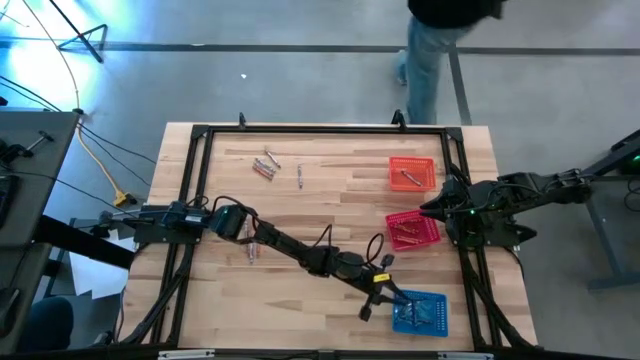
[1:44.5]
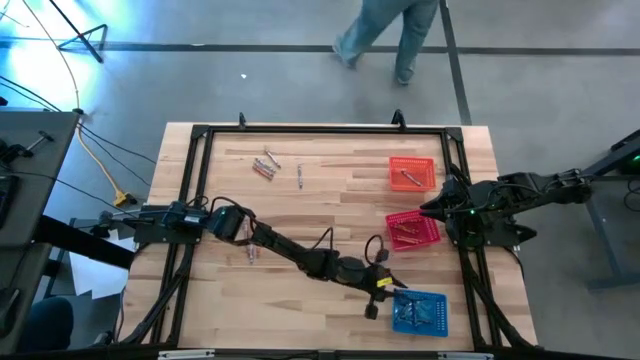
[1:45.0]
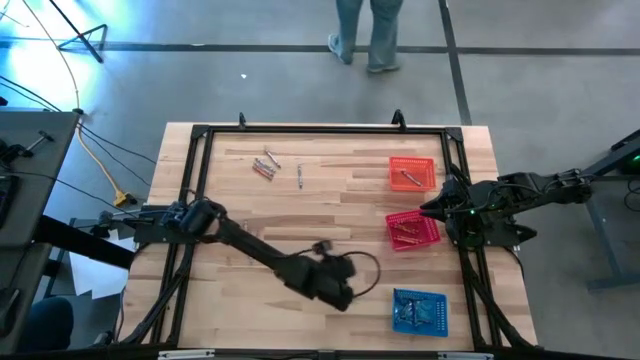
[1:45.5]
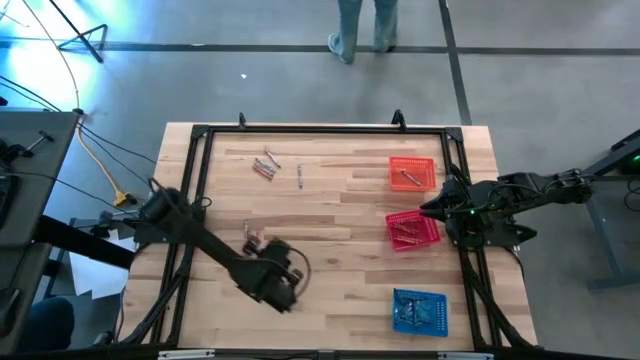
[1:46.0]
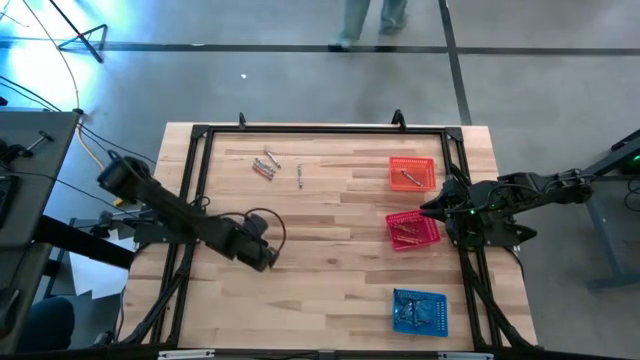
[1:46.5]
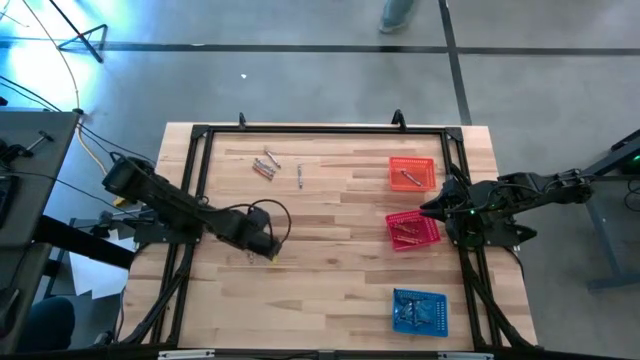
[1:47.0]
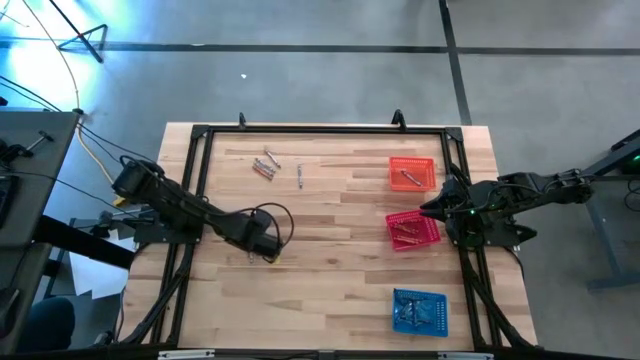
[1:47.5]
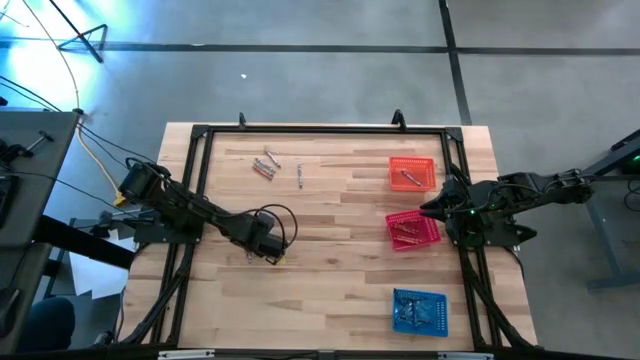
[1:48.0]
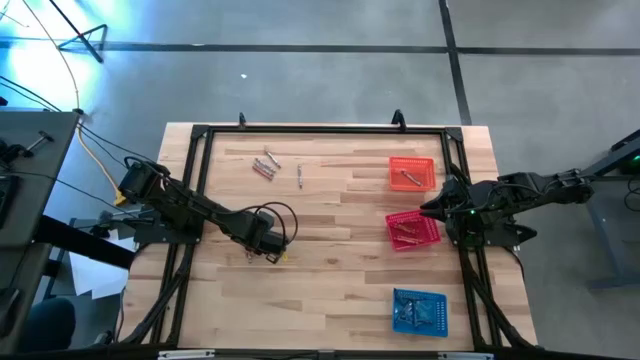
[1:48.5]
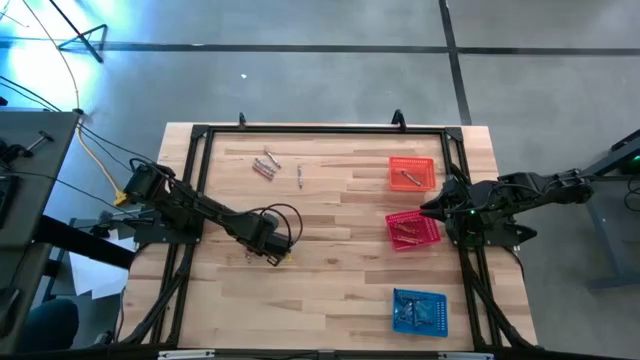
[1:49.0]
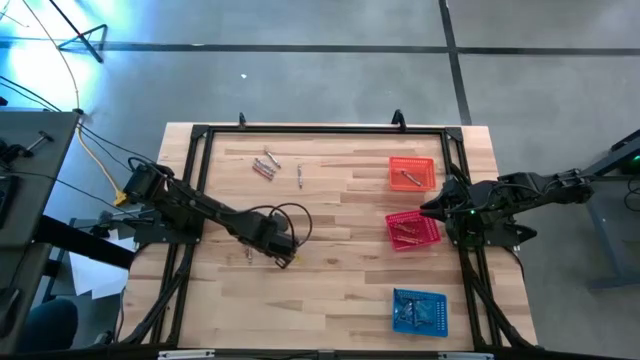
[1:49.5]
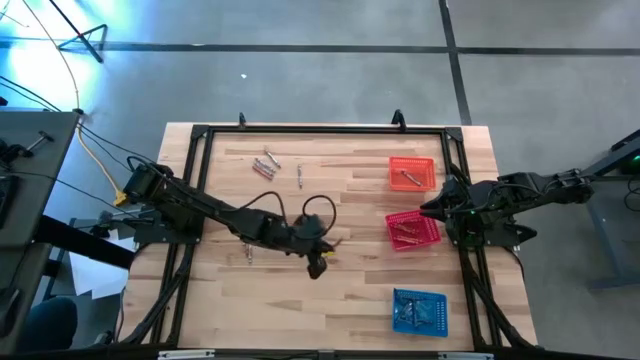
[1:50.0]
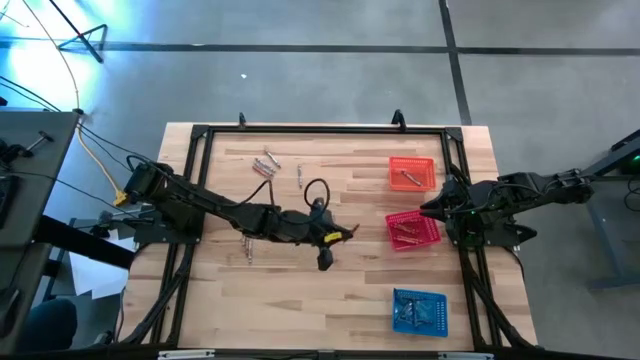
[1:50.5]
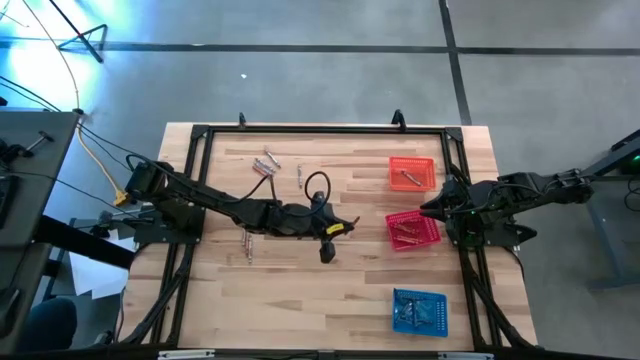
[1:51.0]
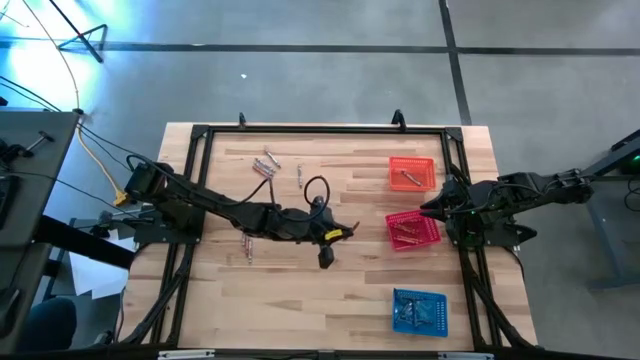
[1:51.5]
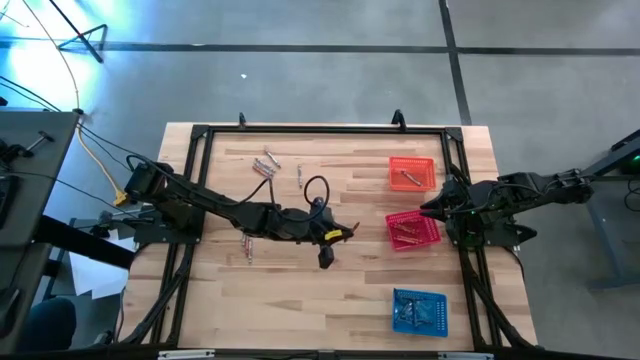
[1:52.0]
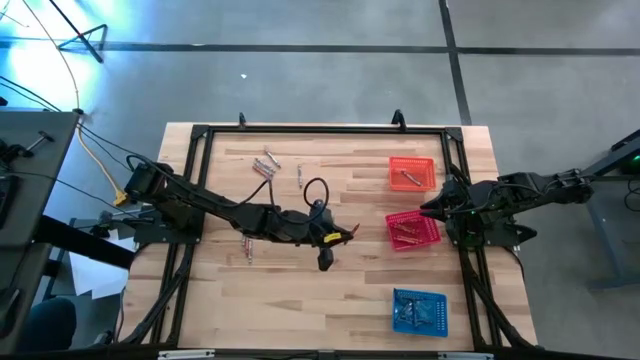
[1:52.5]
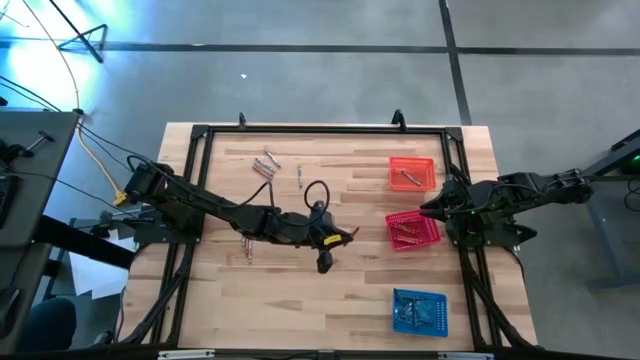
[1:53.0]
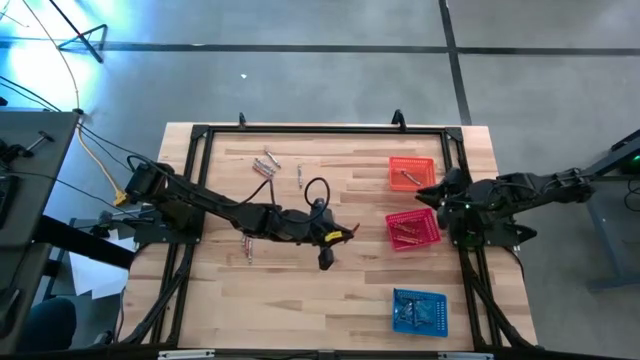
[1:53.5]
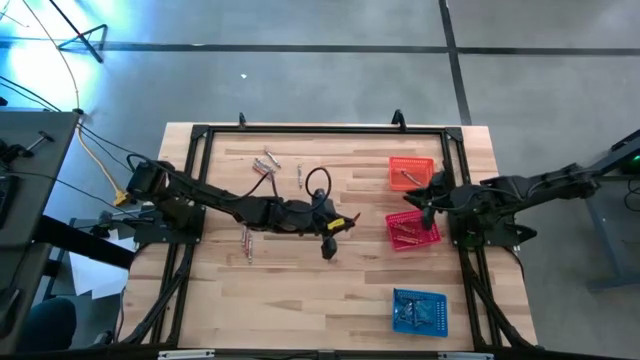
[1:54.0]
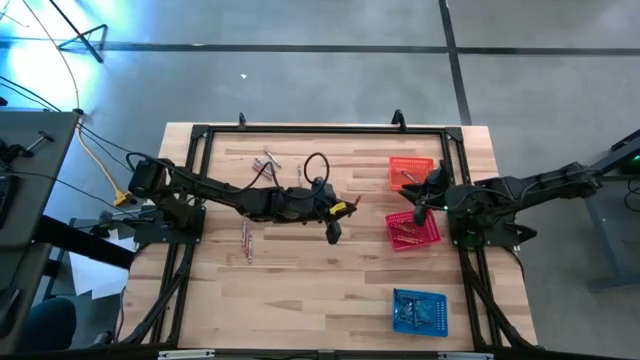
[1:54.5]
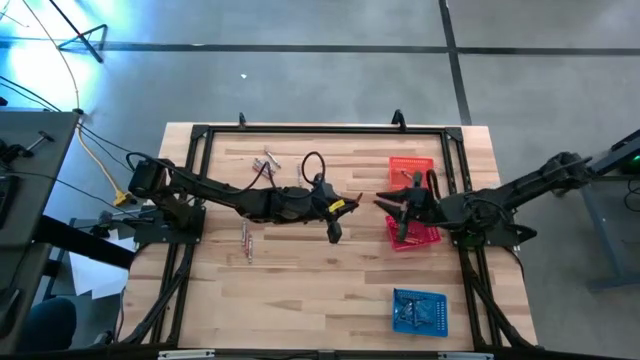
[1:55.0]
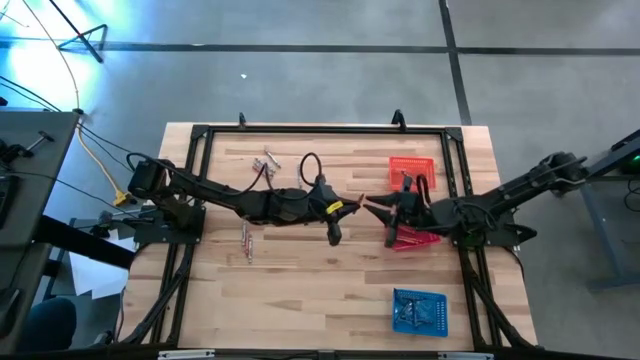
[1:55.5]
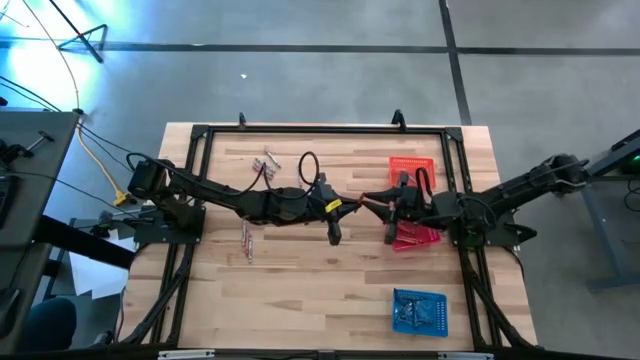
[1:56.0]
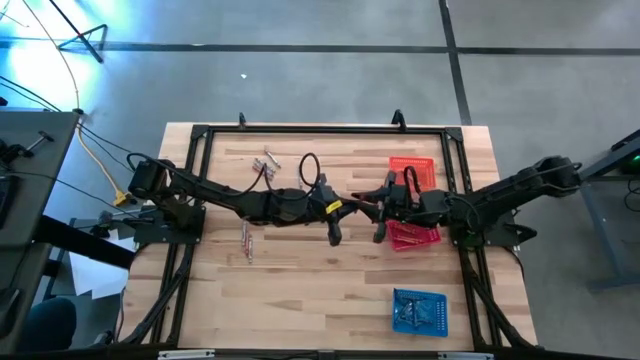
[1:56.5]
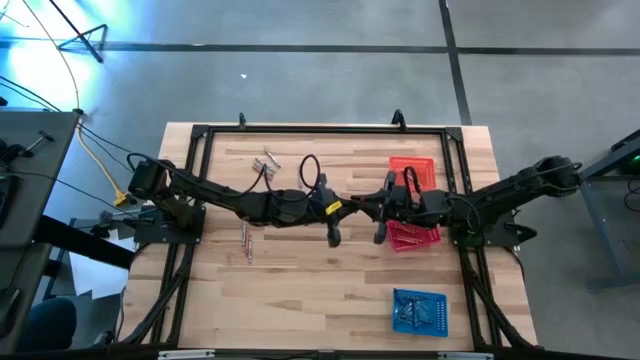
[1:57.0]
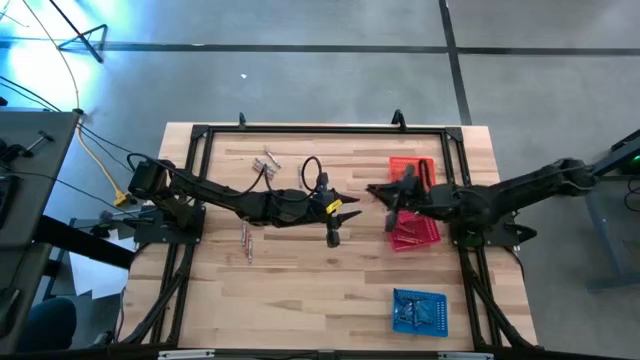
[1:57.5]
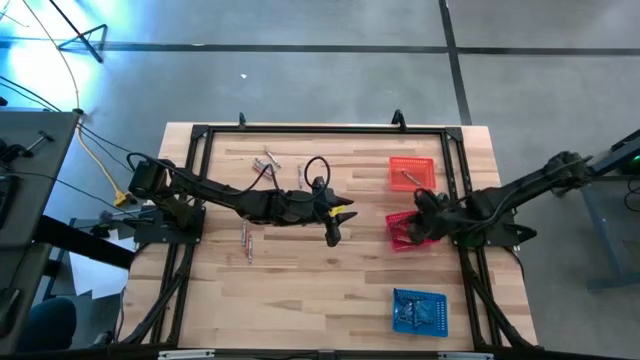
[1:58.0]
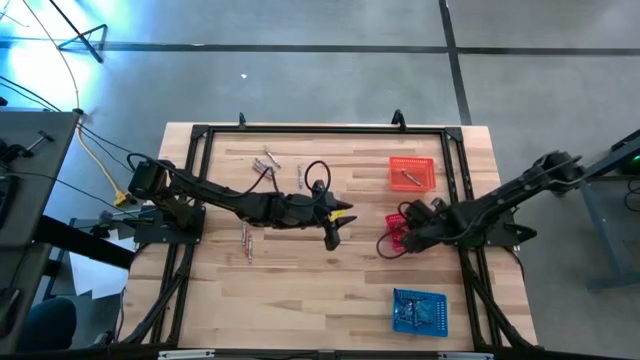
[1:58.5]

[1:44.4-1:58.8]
Task: Sort crayons
Put the orange crayon into the red bin

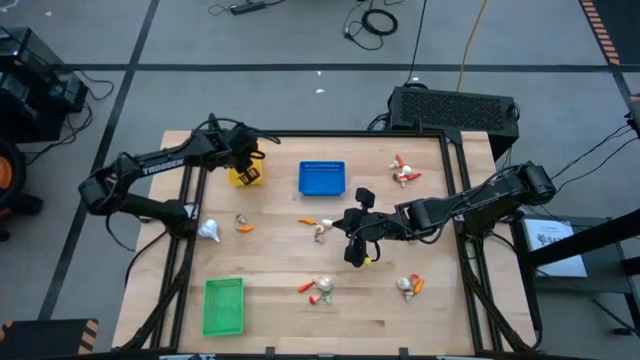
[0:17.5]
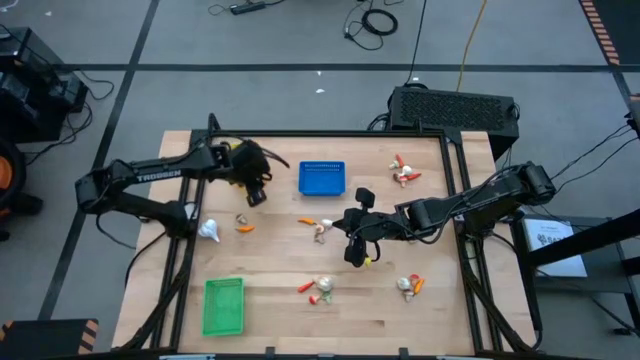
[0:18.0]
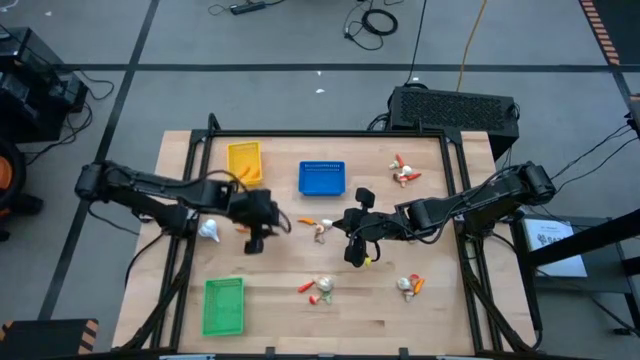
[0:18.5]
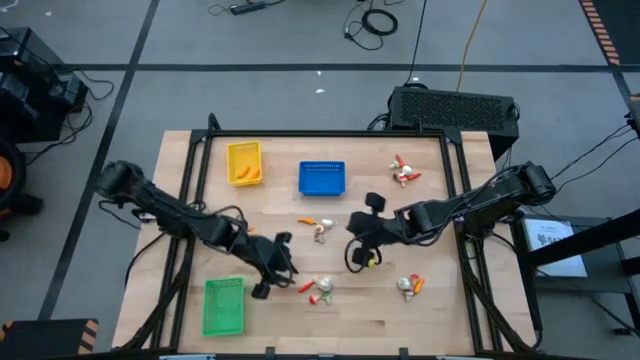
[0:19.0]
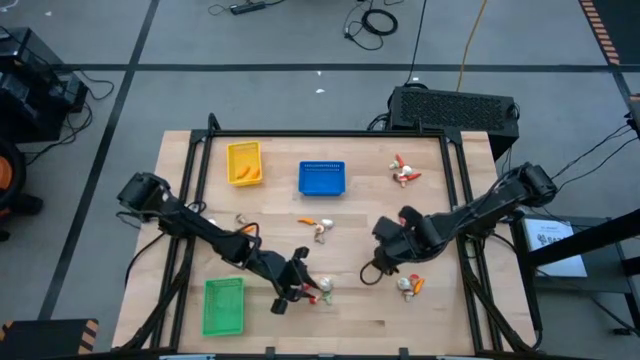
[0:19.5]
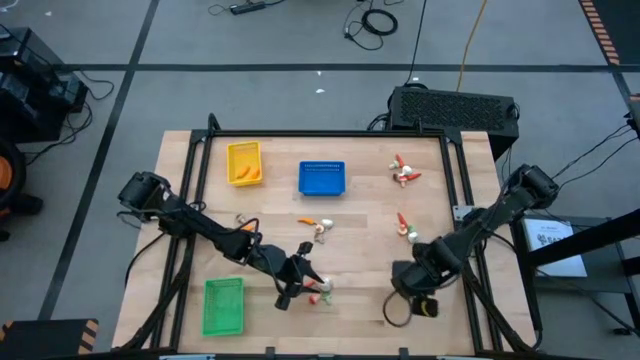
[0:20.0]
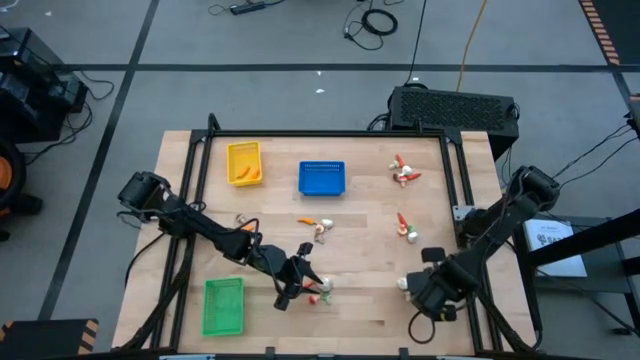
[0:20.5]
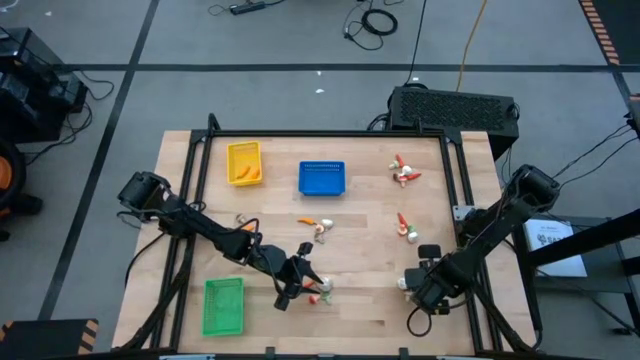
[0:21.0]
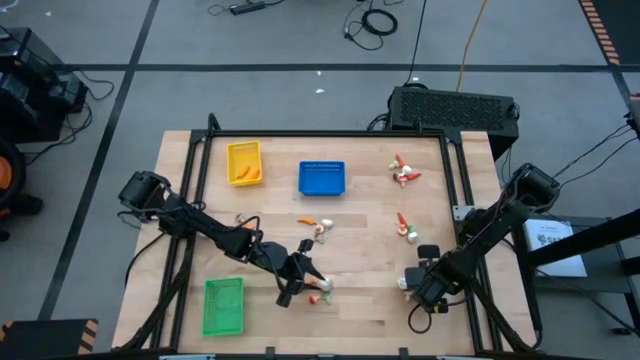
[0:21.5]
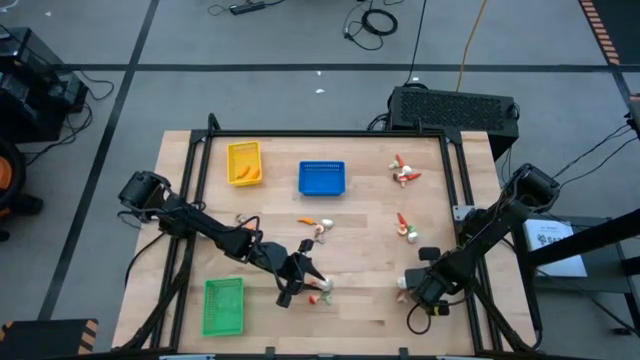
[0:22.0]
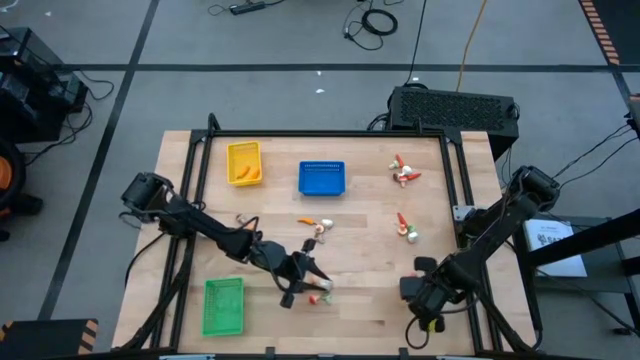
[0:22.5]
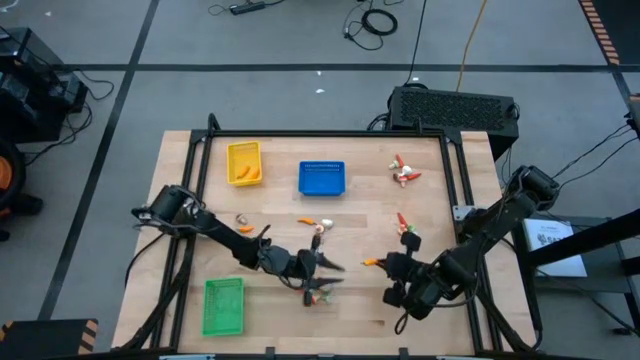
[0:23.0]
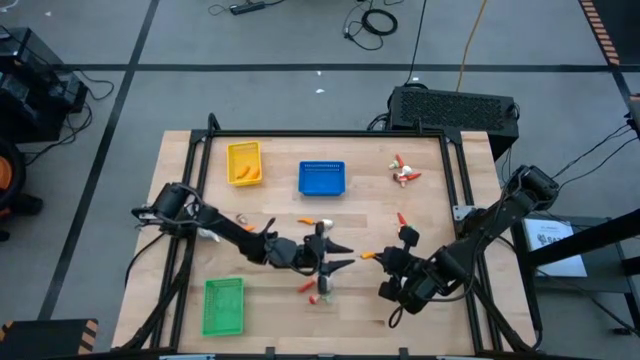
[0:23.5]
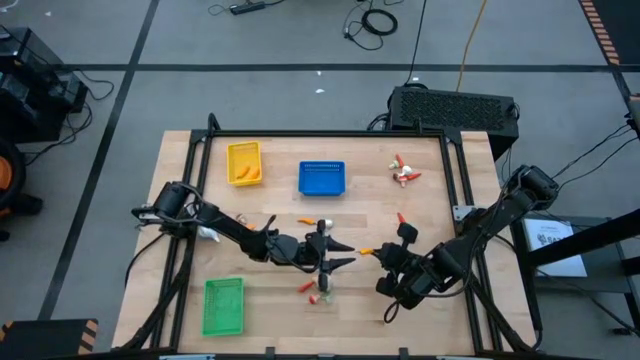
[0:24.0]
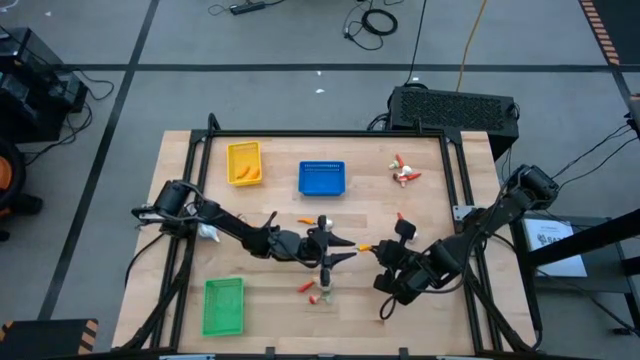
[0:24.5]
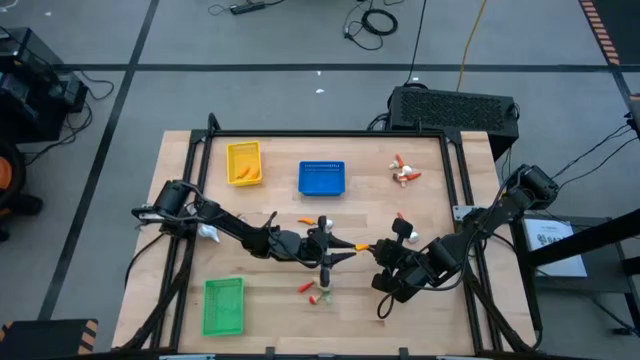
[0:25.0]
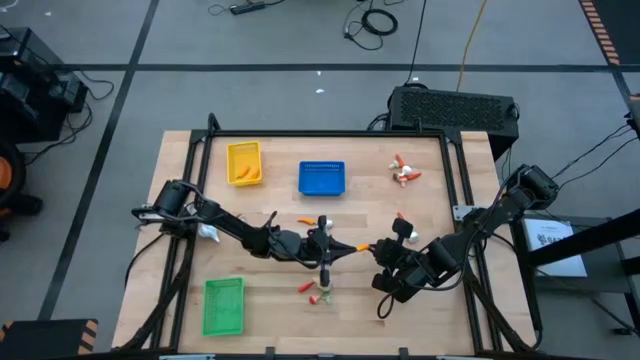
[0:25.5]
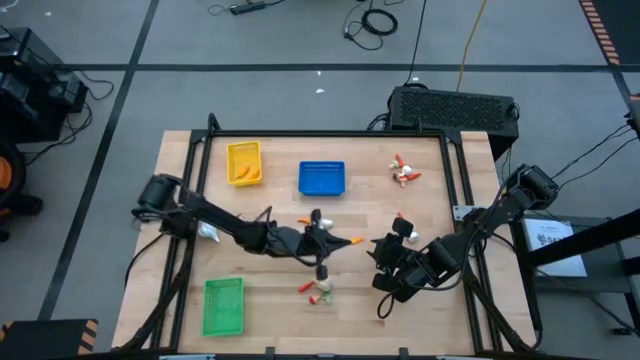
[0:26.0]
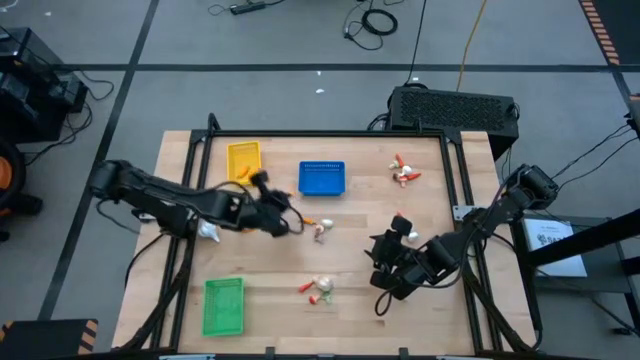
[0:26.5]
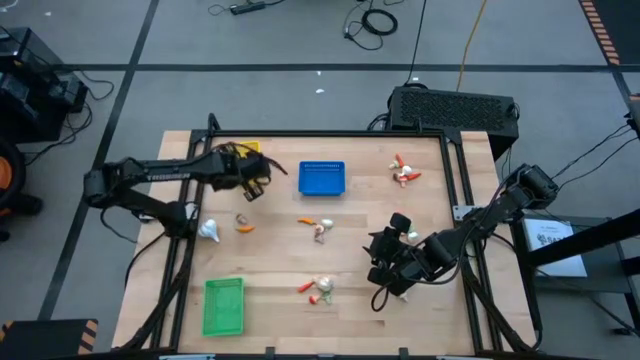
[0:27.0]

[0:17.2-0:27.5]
Task: Sort produce into baskets
Put the yellow chili pepper into the yellow bin
